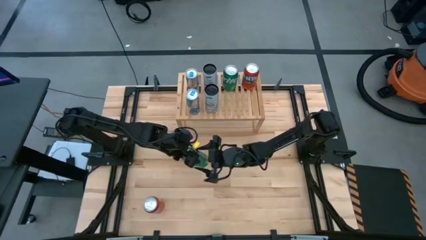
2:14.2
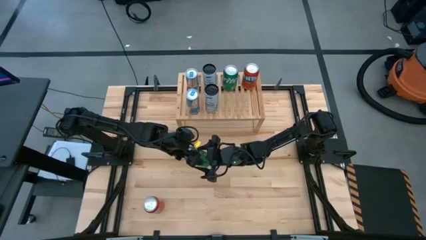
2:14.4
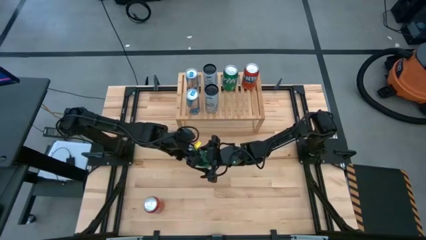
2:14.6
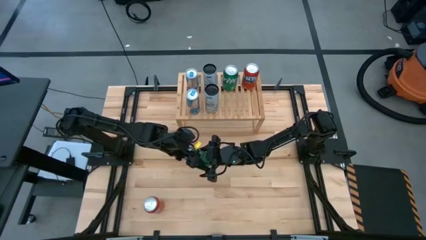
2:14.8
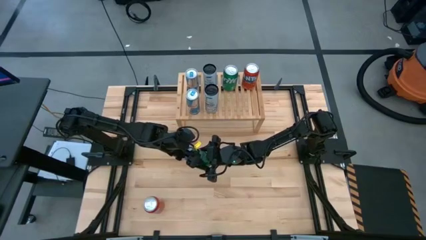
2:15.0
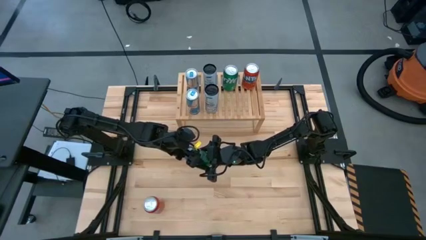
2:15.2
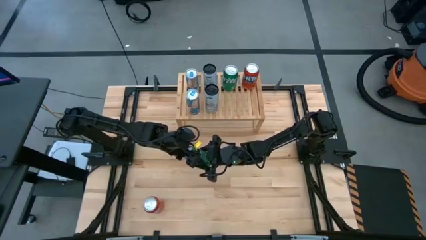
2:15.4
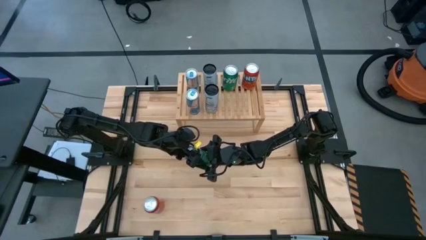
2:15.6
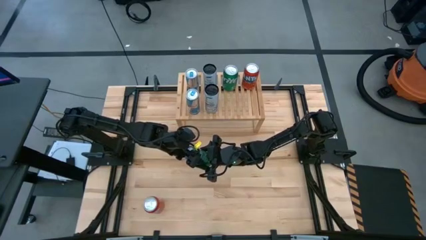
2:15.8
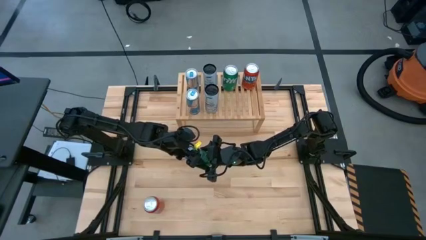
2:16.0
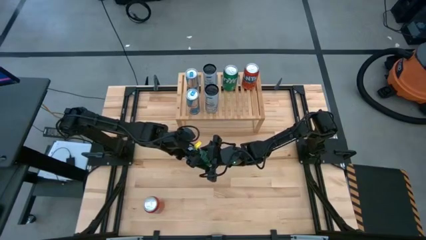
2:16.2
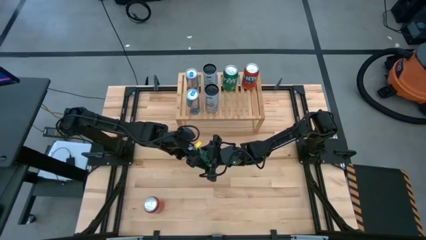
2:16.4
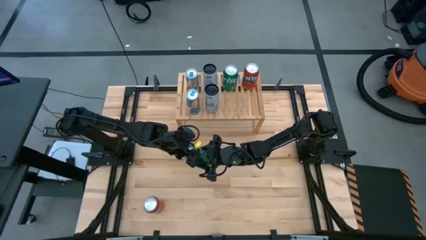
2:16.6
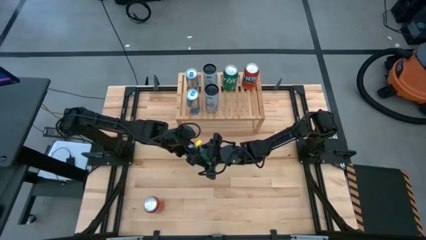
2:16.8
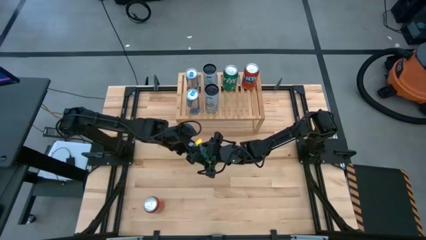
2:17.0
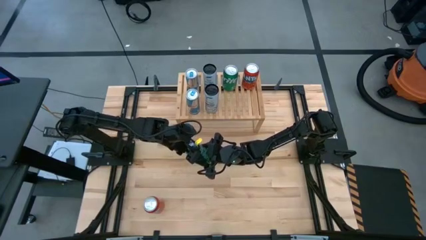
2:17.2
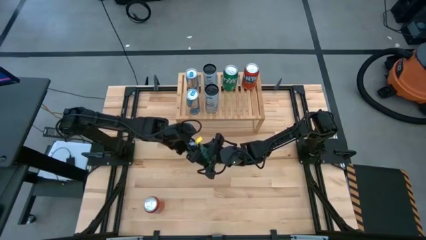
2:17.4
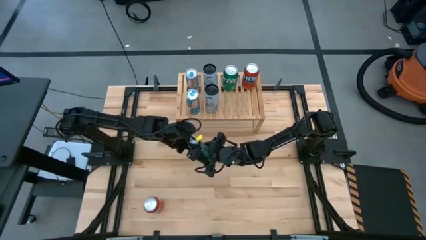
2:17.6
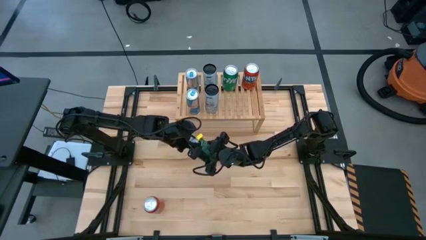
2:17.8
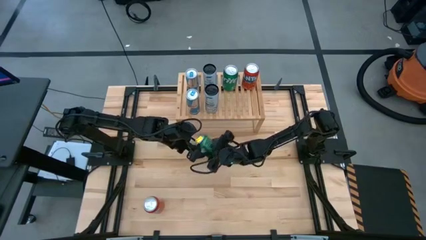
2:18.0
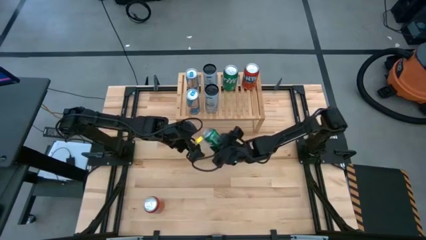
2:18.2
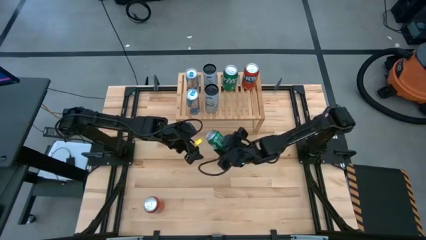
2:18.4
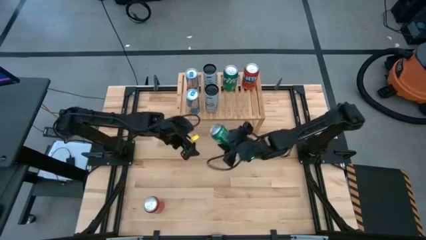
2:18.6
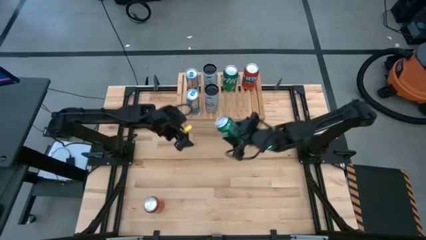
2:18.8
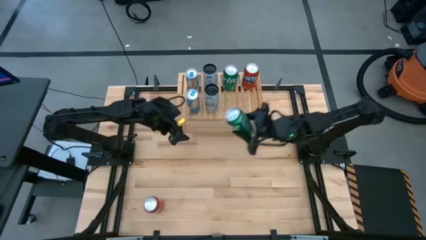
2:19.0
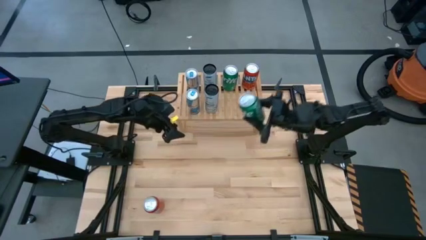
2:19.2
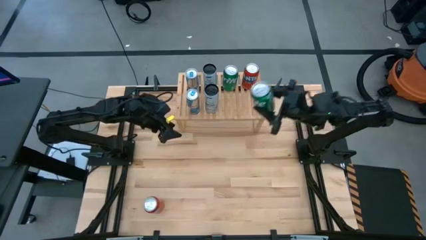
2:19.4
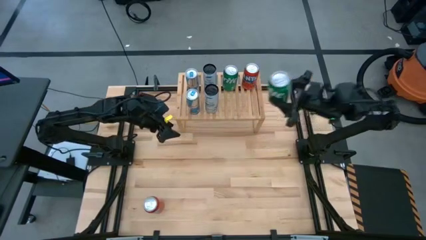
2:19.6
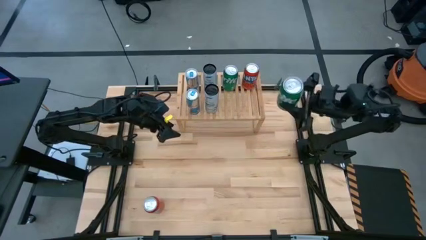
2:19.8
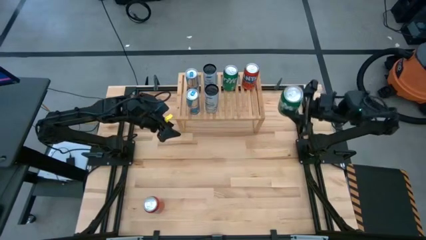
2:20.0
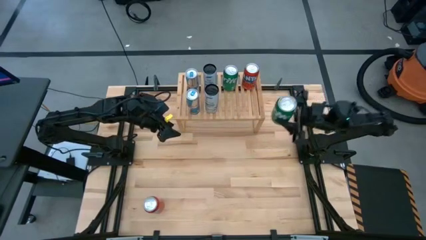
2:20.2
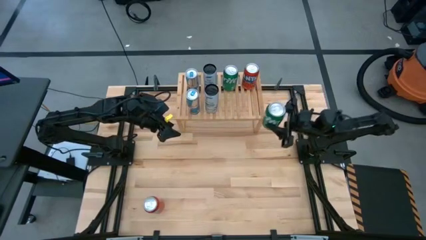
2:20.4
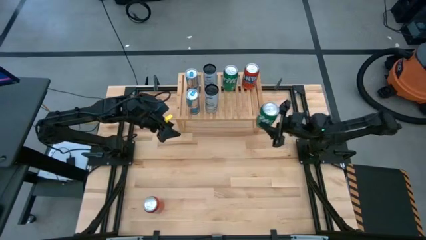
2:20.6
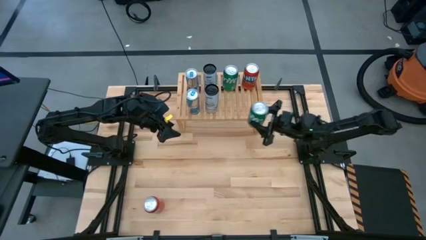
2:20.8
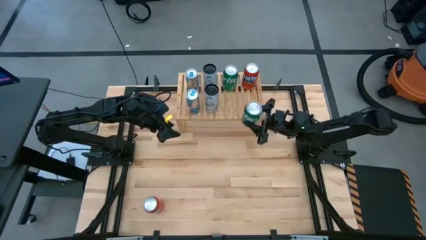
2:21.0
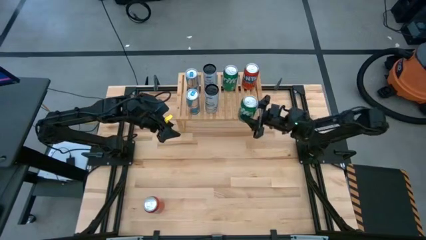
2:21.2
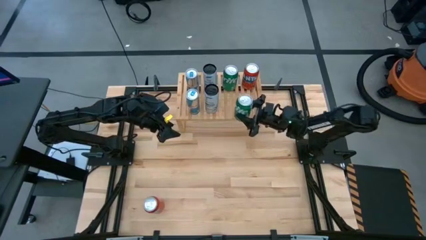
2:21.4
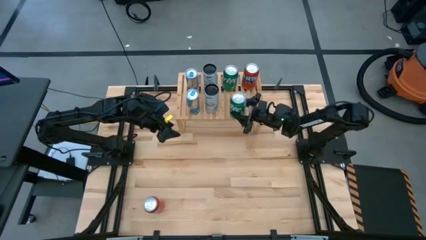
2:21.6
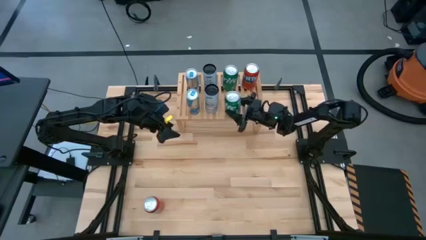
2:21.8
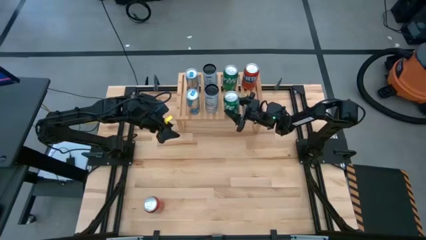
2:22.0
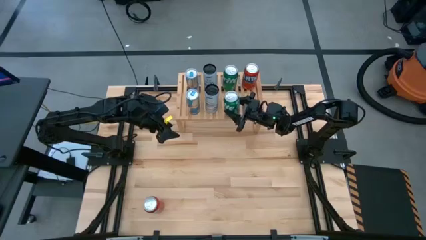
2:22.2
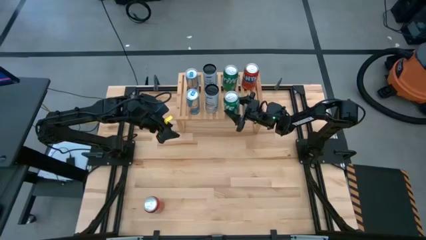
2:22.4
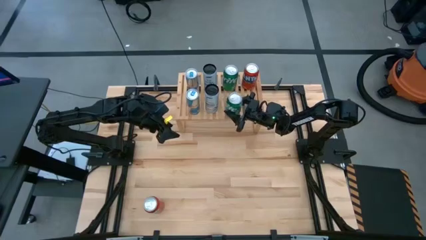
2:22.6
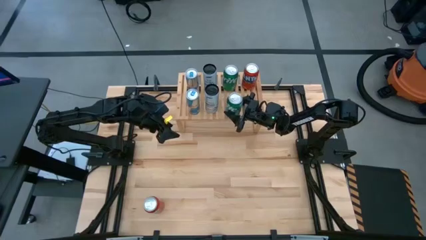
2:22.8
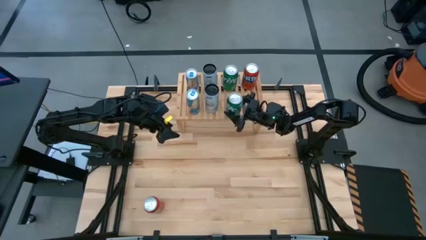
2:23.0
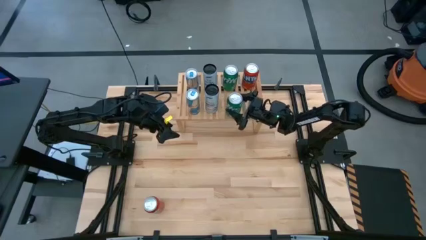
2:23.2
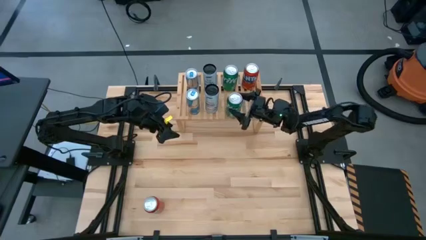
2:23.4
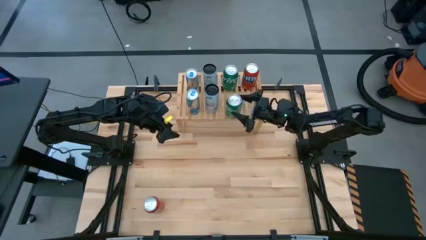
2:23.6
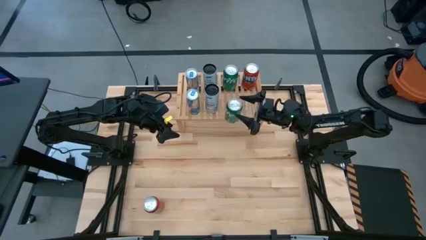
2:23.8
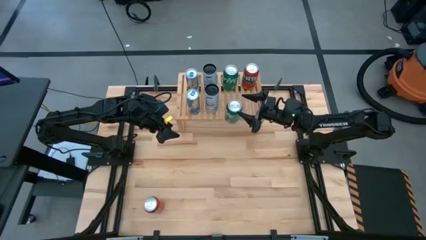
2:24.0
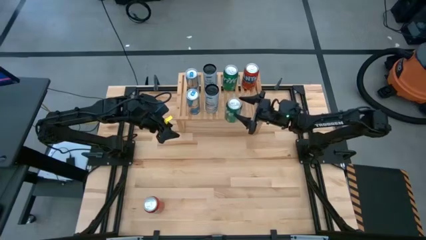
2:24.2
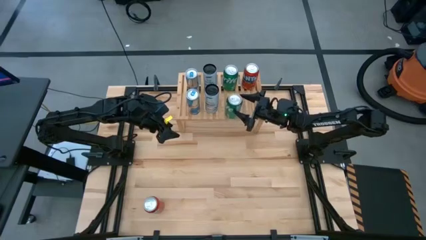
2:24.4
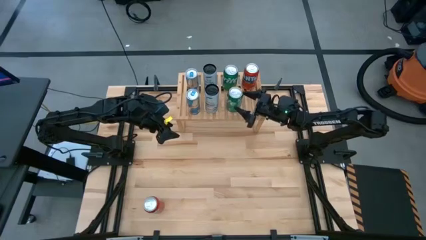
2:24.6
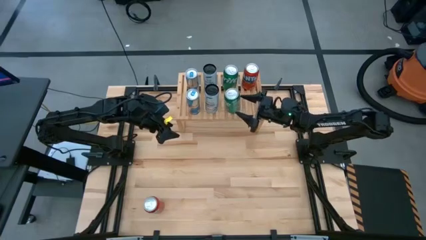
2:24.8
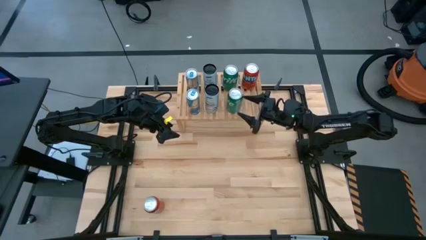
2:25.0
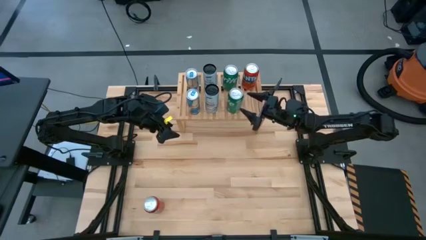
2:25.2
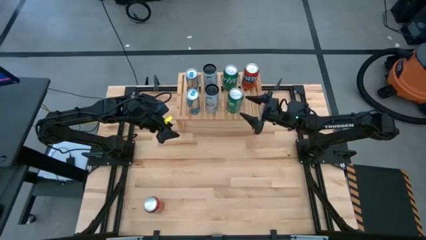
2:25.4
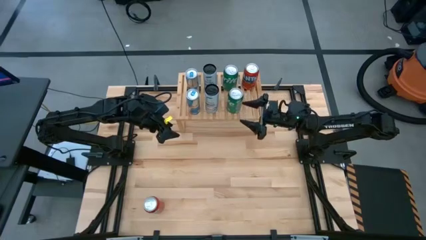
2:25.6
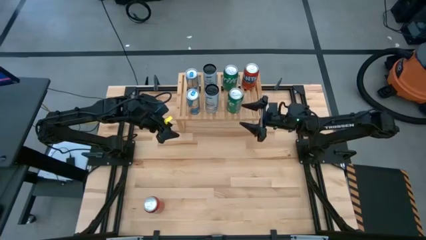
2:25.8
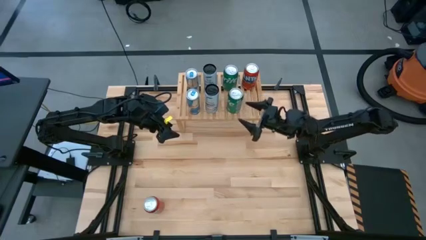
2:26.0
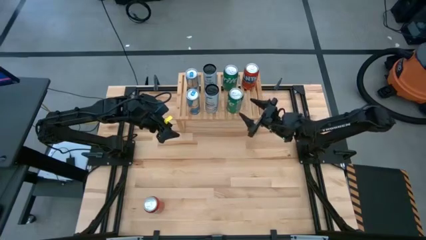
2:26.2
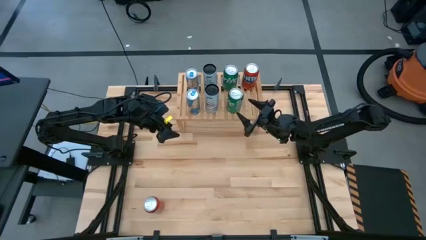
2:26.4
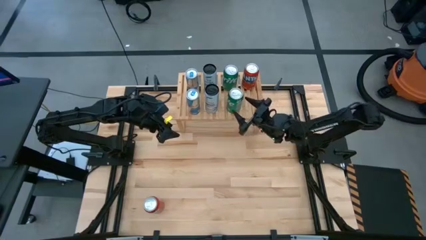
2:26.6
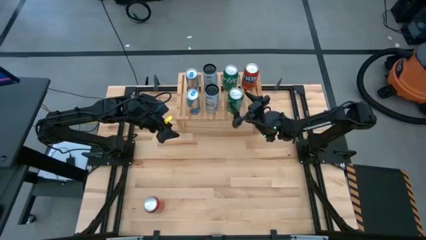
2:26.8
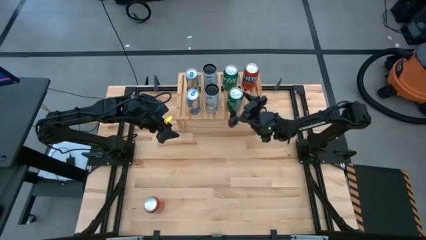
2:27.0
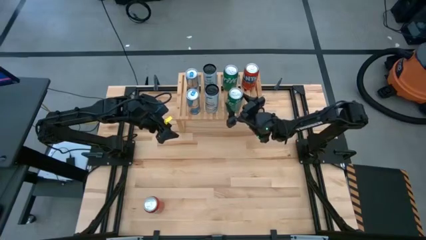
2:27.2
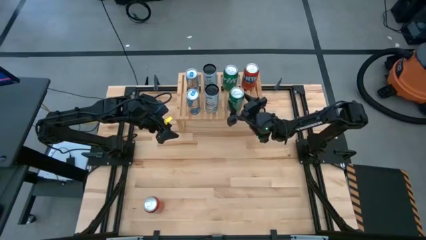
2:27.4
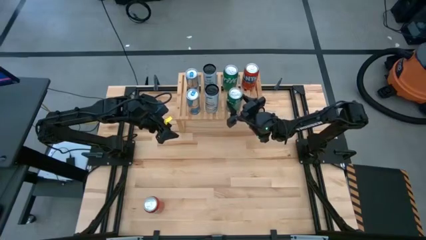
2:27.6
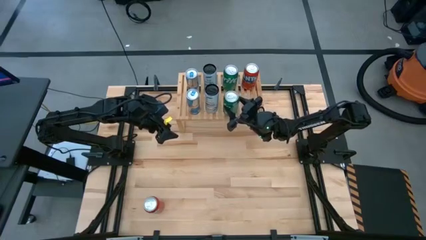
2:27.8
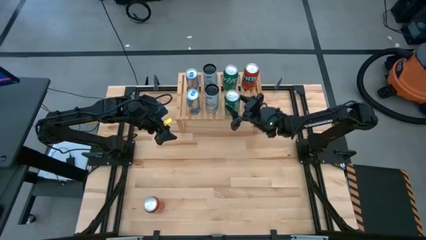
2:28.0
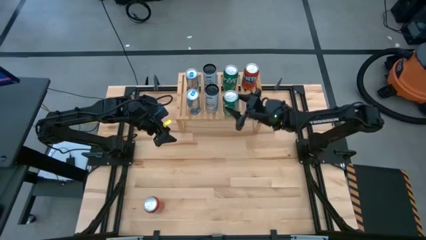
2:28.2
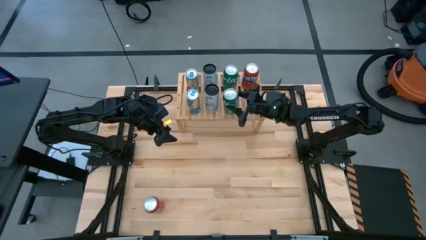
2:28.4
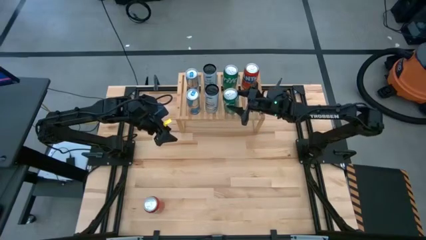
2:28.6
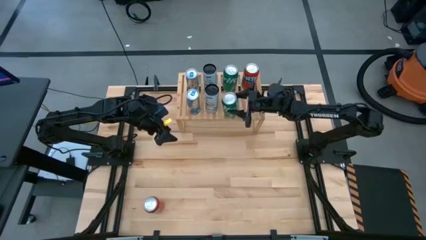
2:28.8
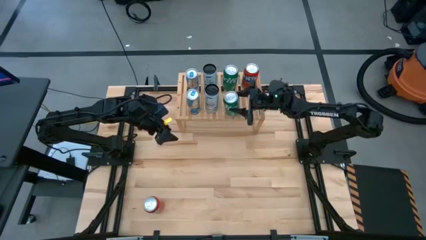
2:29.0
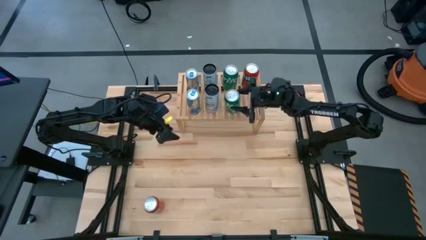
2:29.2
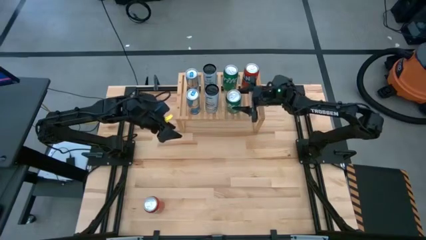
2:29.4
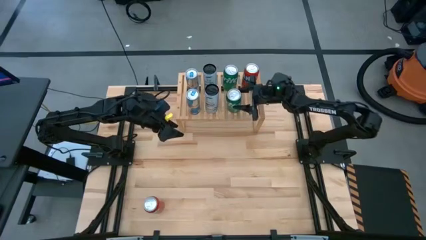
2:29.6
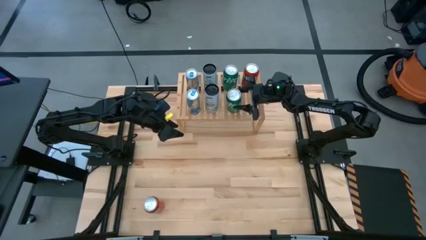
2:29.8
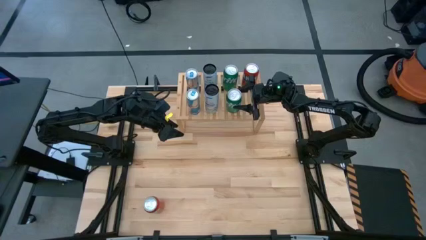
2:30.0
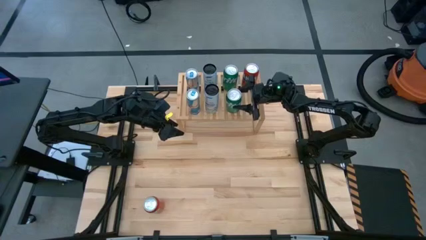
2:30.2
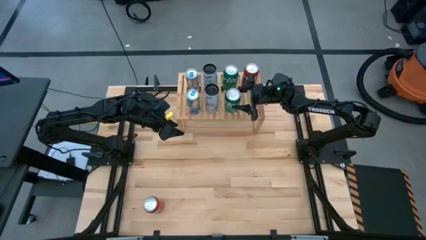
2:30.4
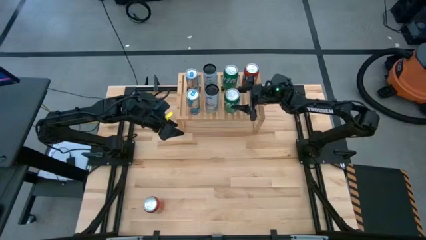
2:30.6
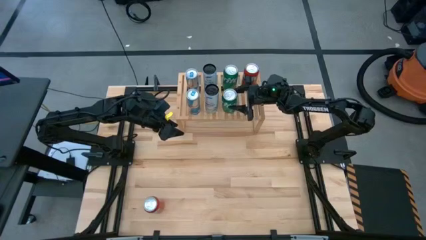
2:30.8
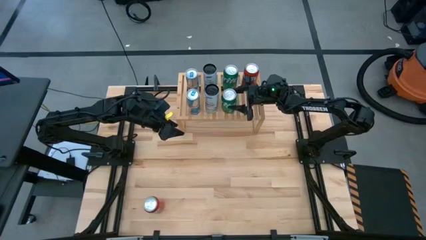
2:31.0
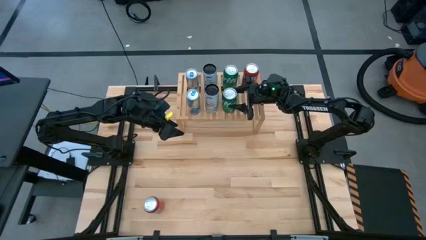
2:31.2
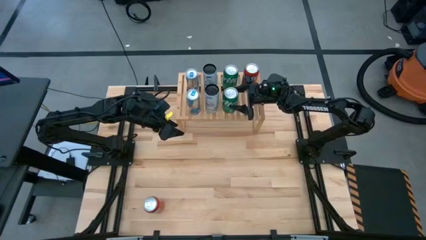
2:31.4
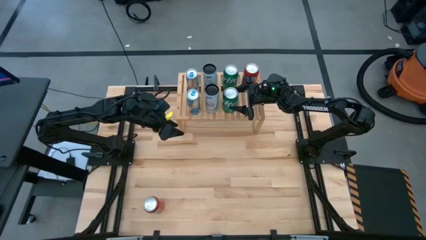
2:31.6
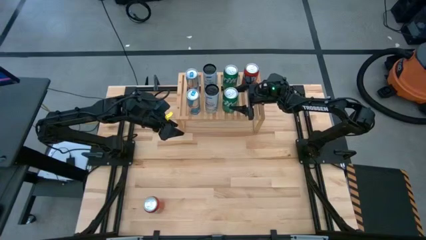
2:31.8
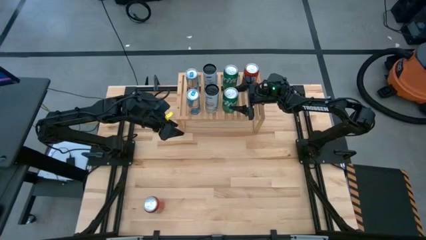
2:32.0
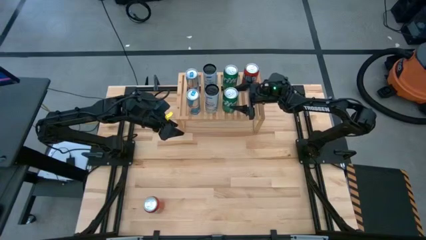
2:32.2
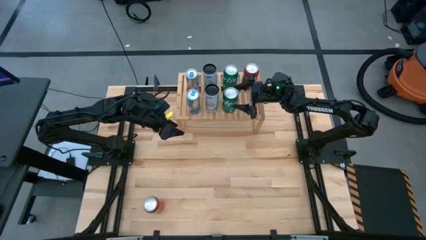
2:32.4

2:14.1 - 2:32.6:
Task: Place canned beverage on shelf
Put the green soda can aligned with the other green soda can on the shelf
